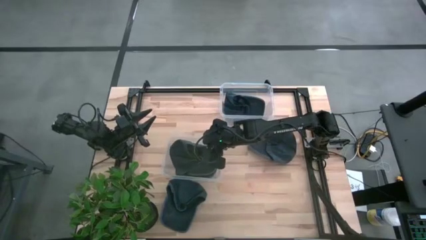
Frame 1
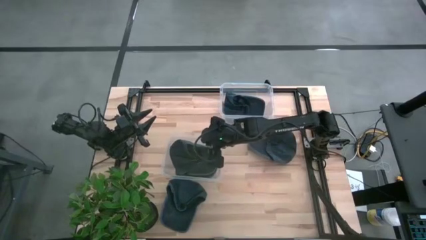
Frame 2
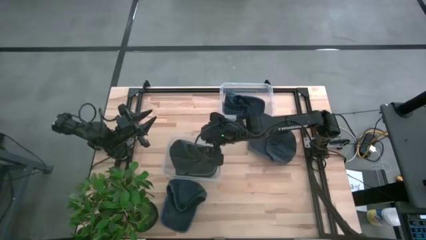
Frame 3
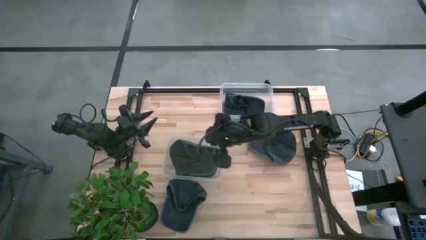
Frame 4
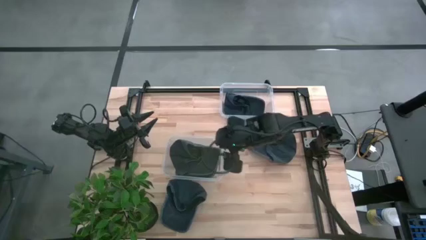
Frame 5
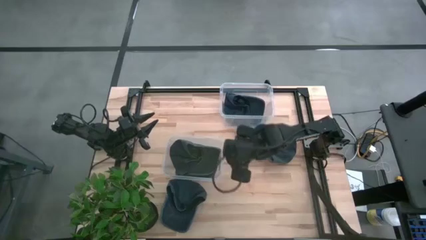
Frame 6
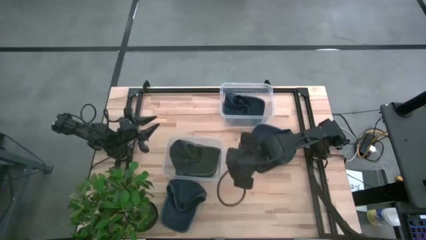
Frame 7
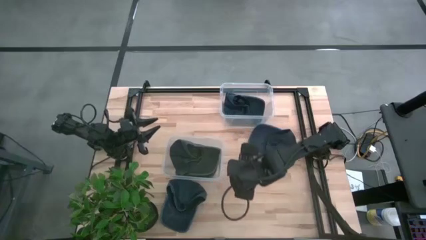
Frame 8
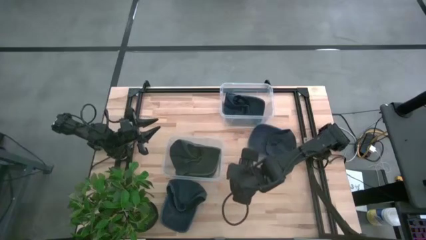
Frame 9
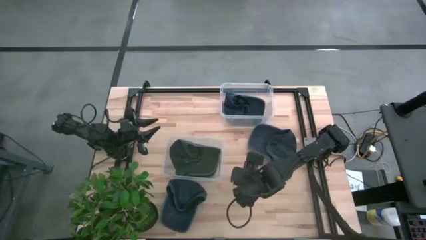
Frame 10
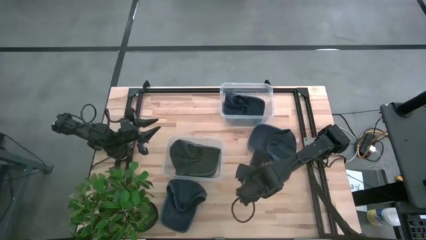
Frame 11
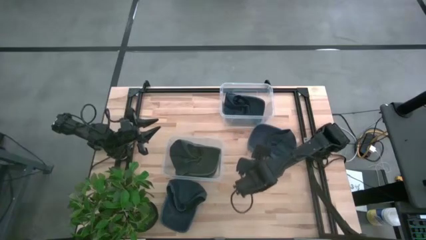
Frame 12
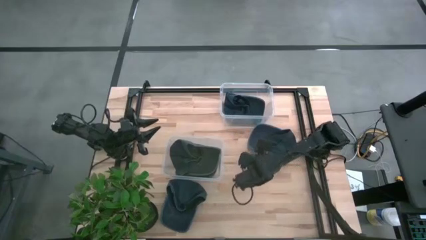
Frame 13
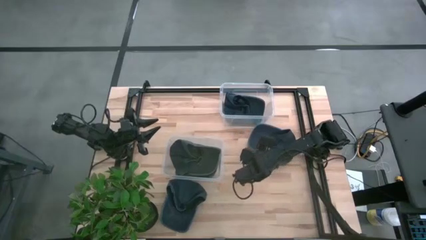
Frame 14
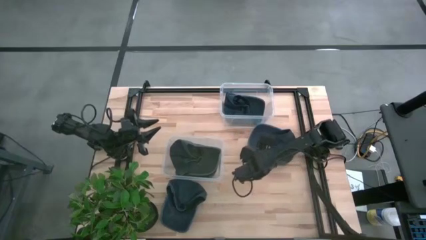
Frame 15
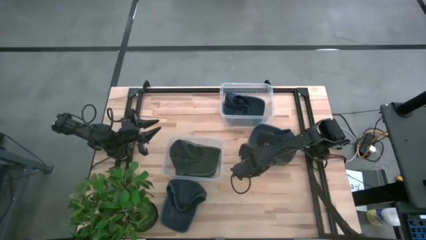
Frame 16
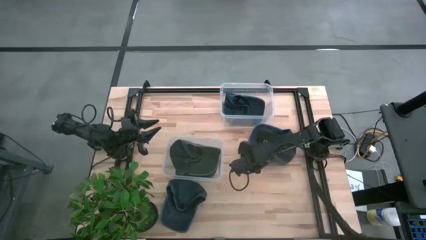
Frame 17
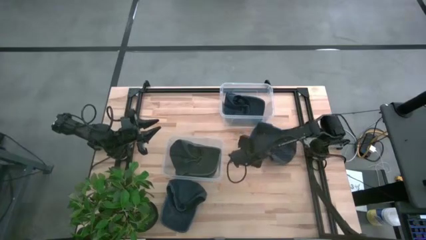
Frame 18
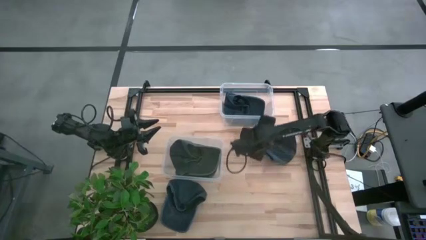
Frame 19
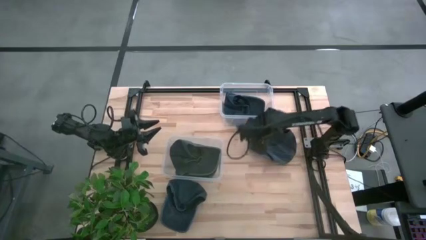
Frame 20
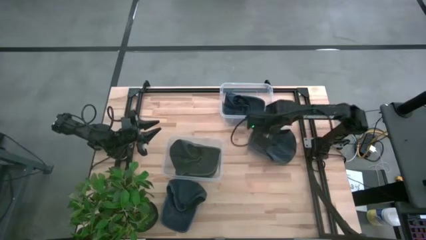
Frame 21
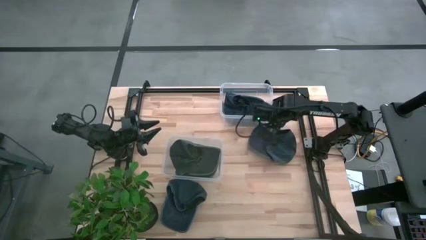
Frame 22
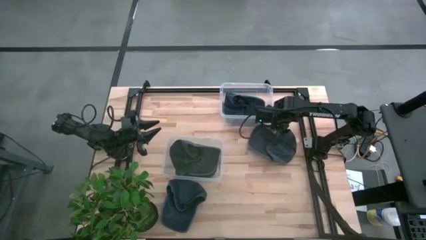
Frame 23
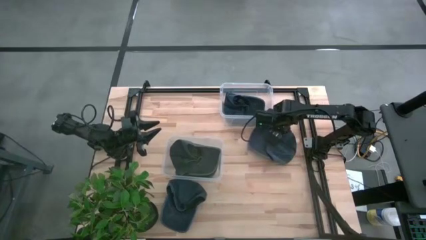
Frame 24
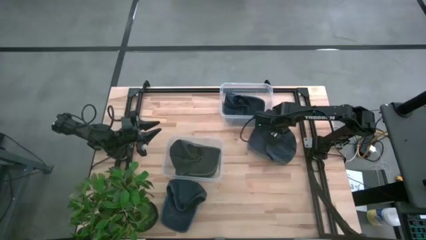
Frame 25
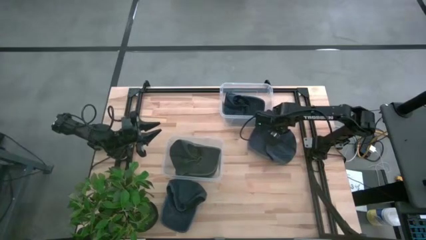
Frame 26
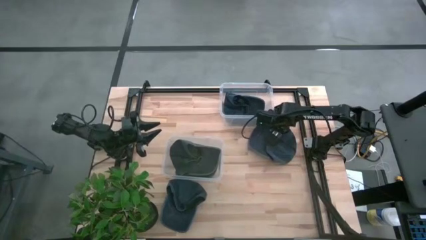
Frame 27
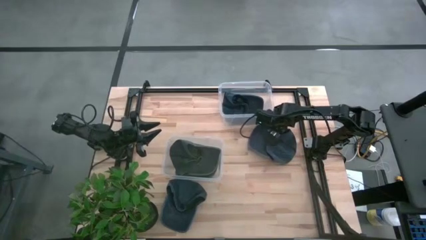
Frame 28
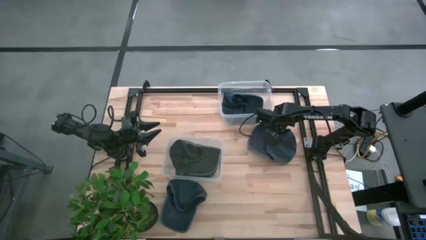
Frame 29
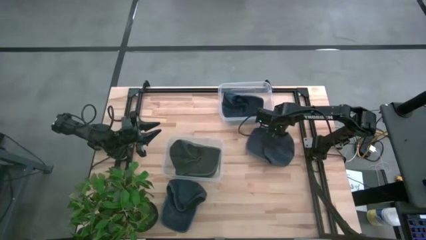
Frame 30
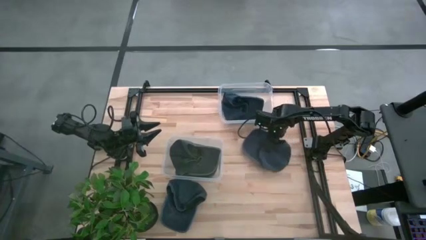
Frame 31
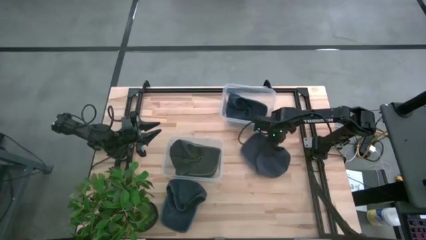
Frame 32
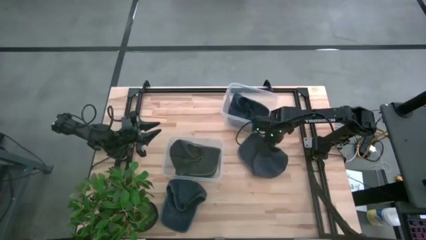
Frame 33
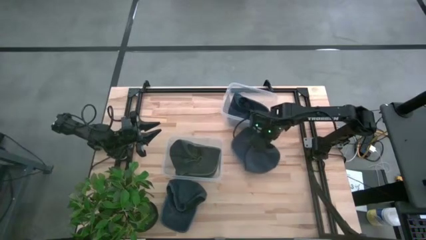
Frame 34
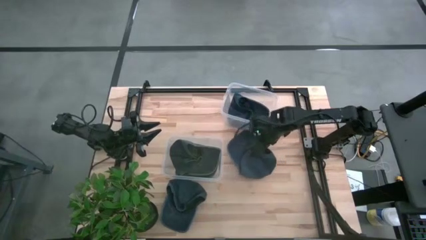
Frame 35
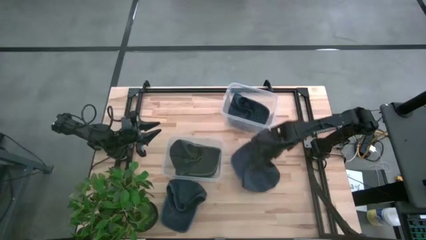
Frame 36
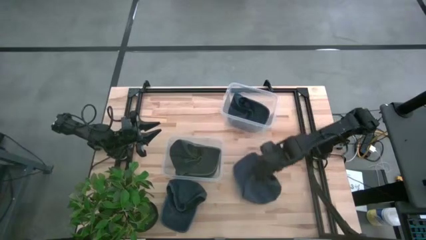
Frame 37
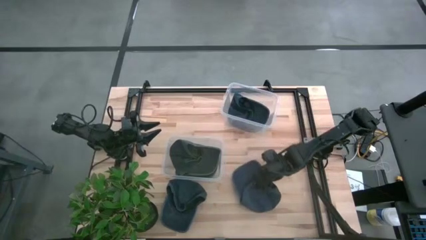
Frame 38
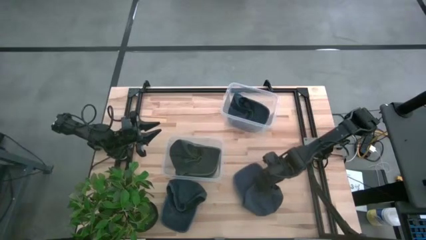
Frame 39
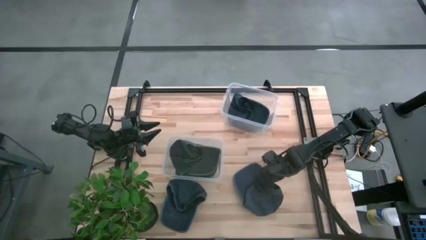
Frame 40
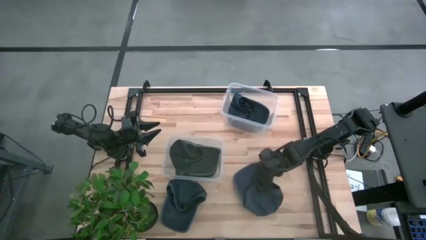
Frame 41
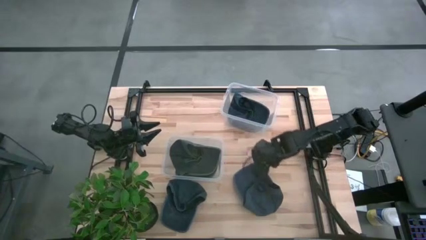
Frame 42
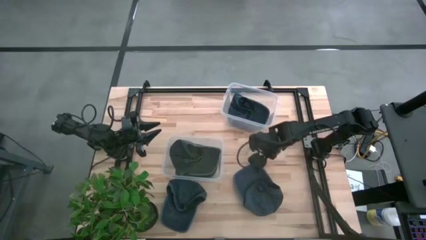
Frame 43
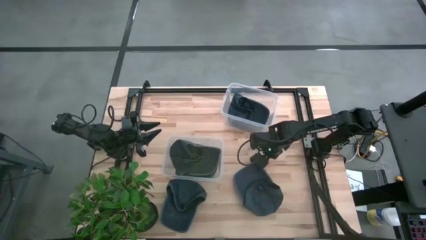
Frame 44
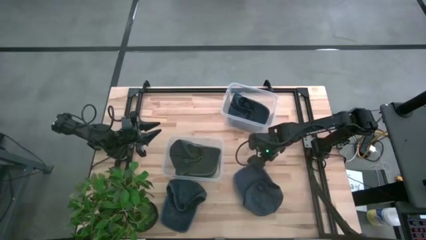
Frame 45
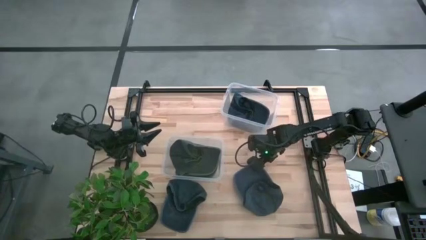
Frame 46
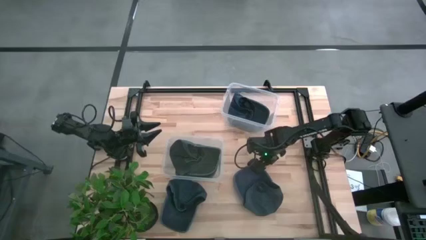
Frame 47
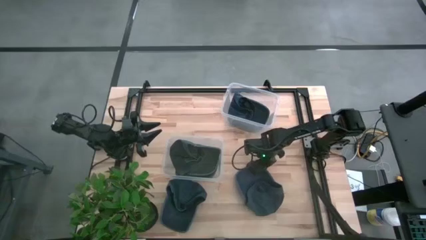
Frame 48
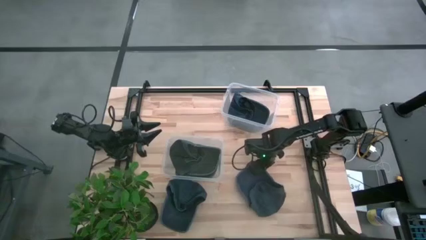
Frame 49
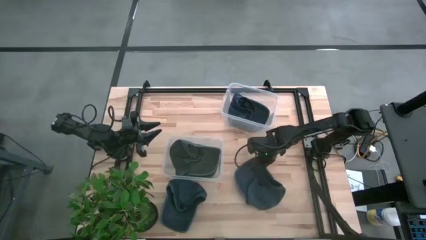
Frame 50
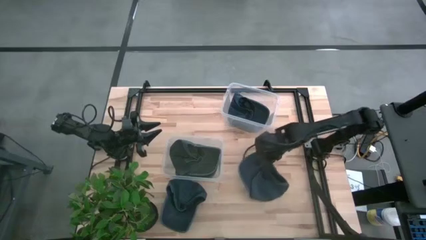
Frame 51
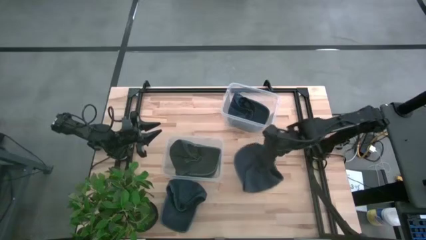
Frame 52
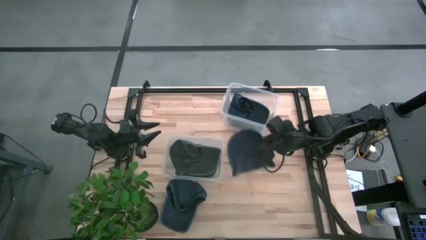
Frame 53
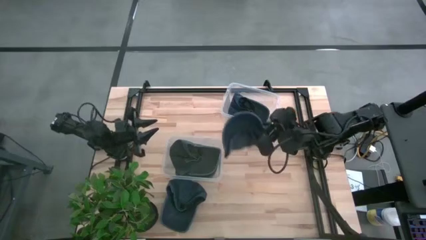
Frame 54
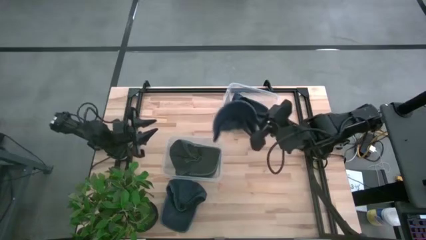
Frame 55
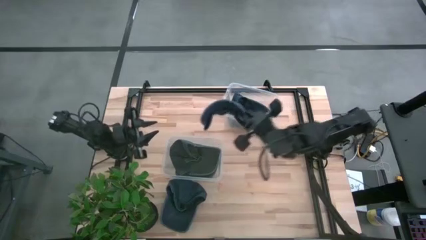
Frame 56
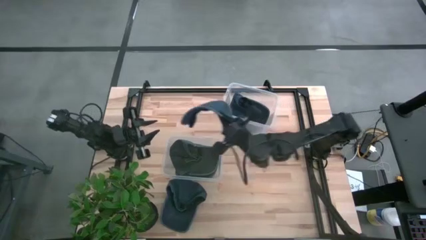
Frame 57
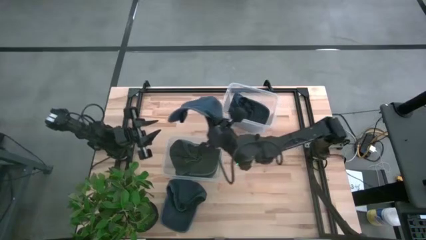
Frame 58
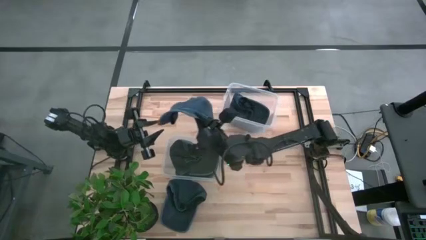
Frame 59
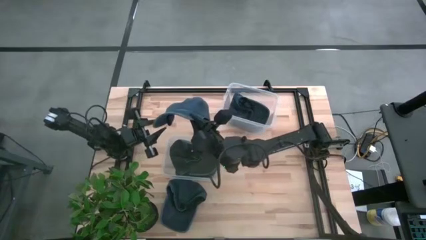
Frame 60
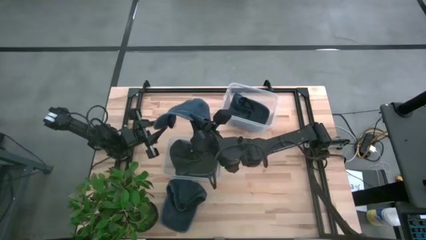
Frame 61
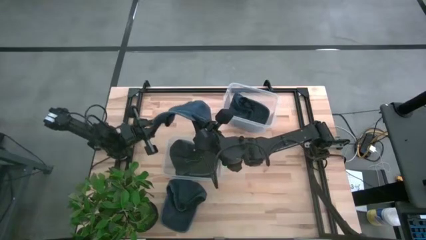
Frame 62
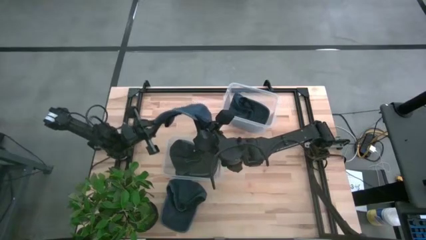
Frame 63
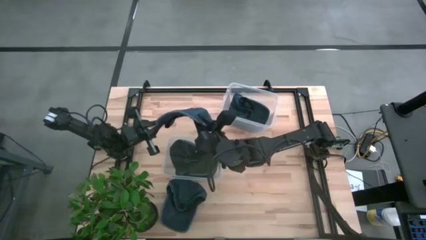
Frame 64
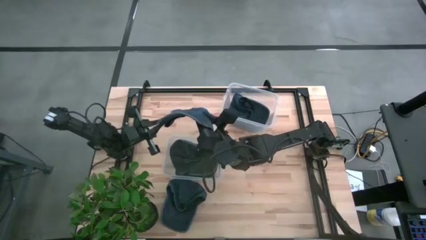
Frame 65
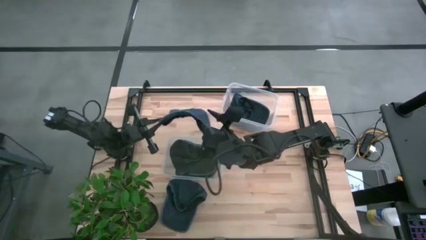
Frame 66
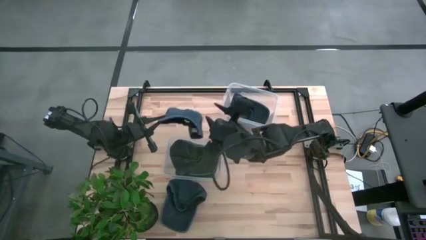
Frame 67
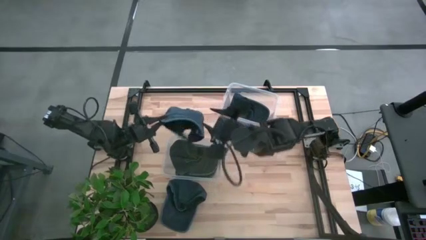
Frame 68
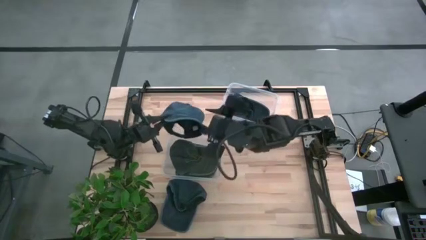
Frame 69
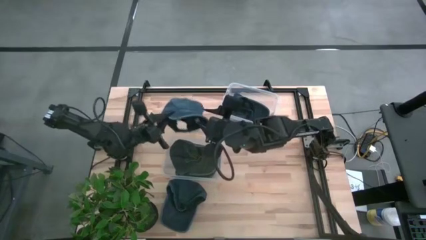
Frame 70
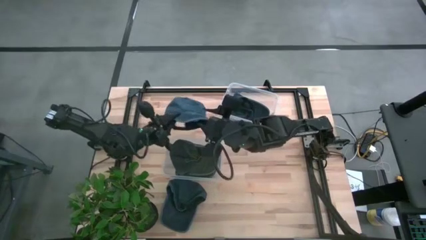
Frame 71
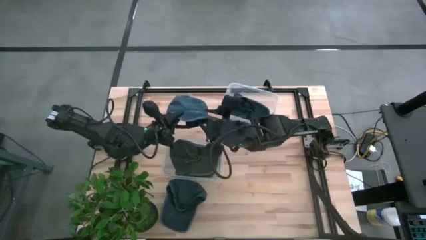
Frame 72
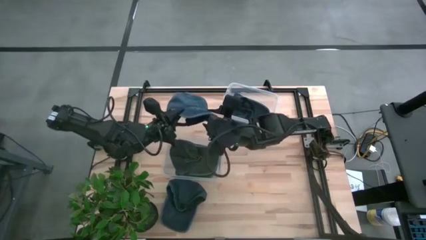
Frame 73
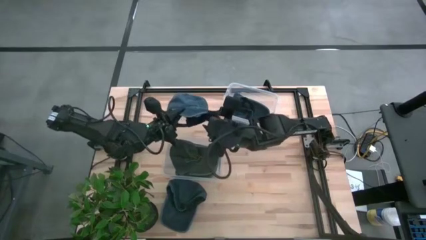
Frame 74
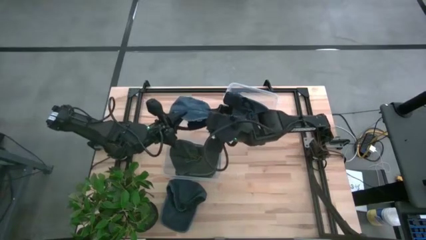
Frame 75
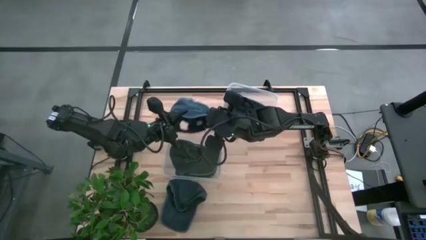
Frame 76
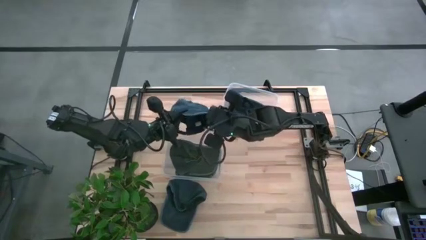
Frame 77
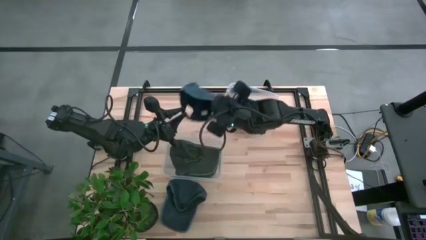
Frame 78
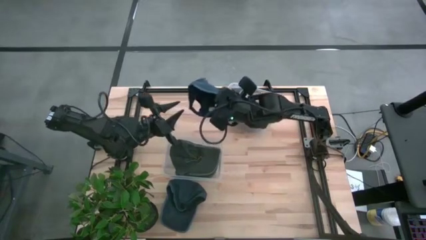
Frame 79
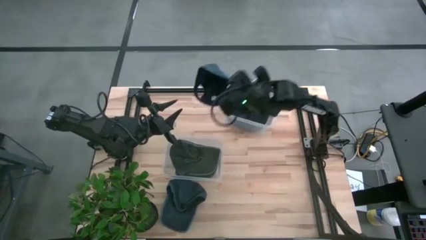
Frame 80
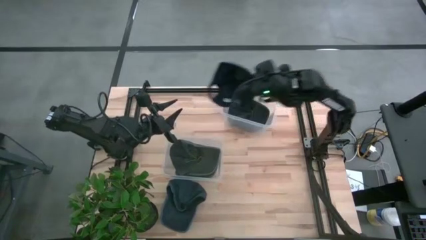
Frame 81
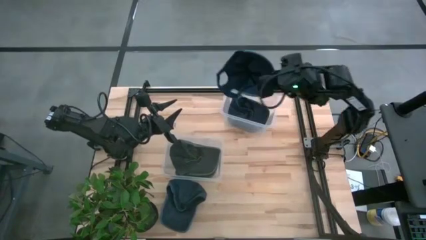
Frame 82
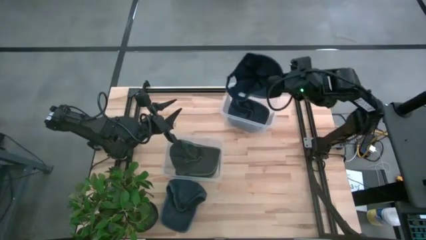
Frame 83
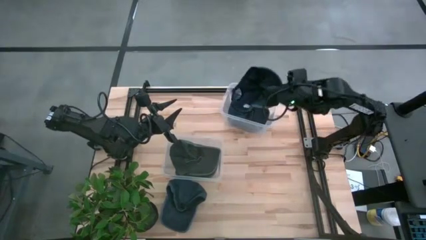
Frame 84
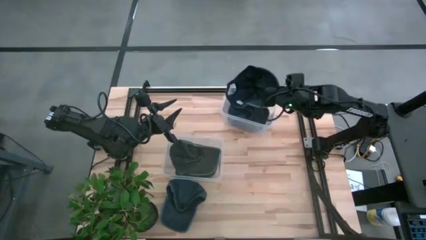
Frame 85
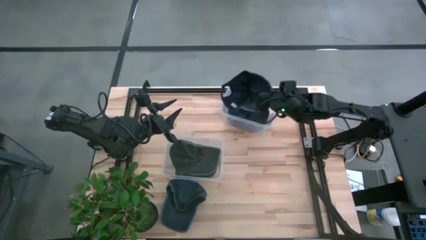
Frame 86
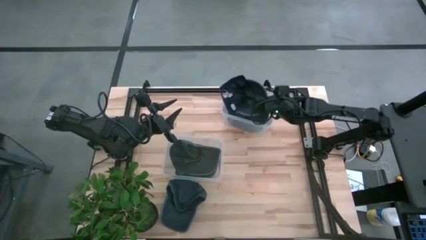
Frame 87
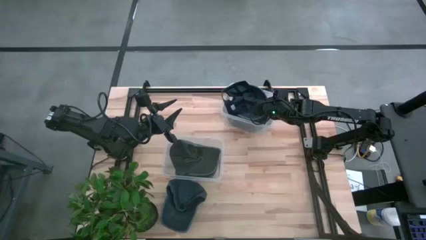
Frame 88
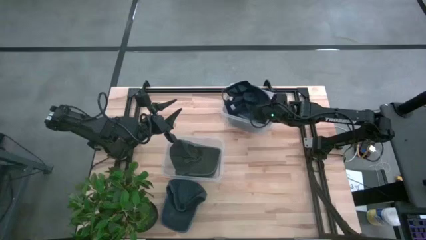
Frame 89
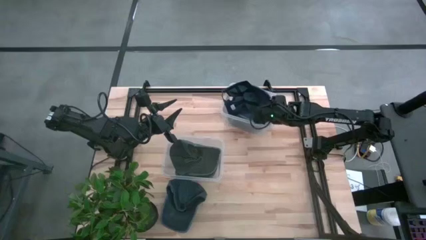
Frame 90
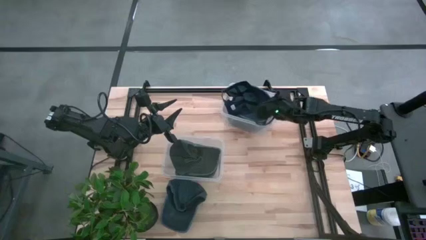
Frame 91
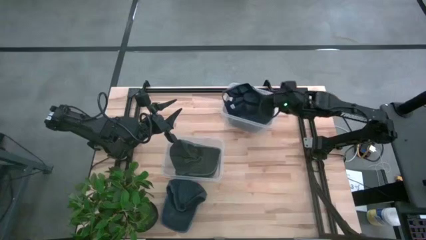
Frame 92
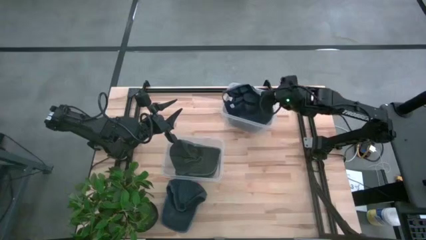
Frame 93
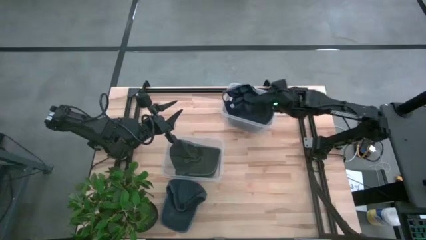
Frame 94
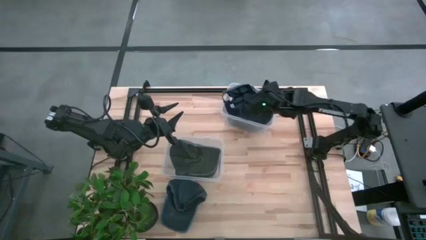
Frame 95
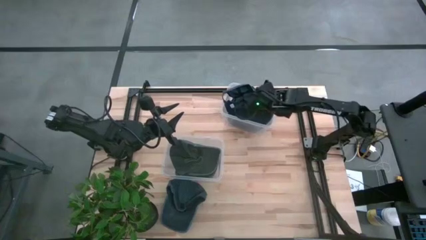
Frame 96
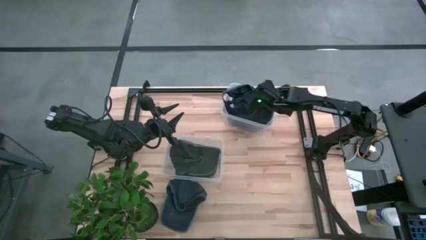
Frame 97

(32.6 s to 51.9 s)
Task: Pick & Place hat
Put the top blue cap into the top transparent bin
